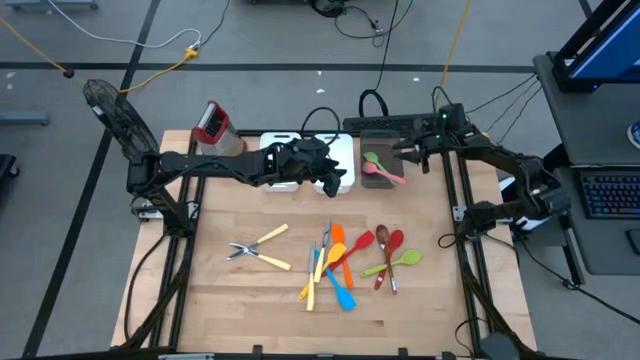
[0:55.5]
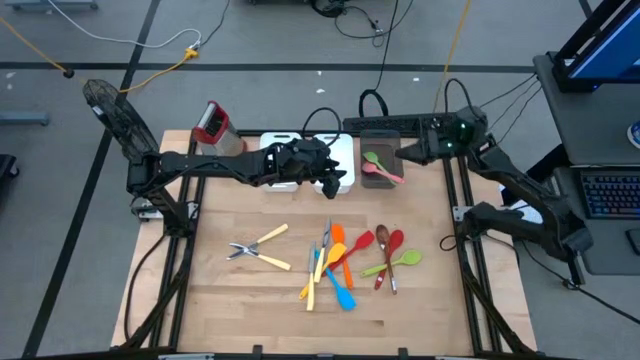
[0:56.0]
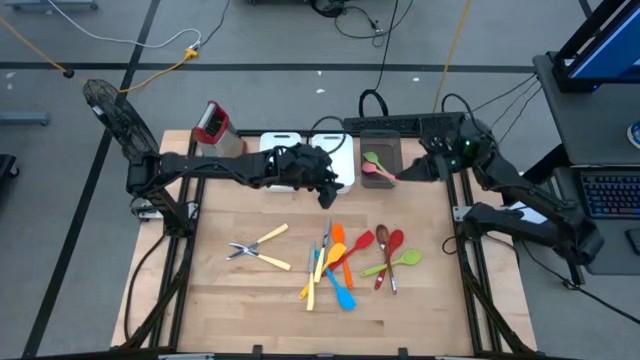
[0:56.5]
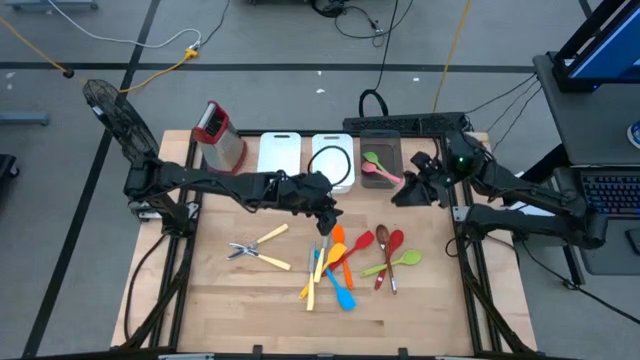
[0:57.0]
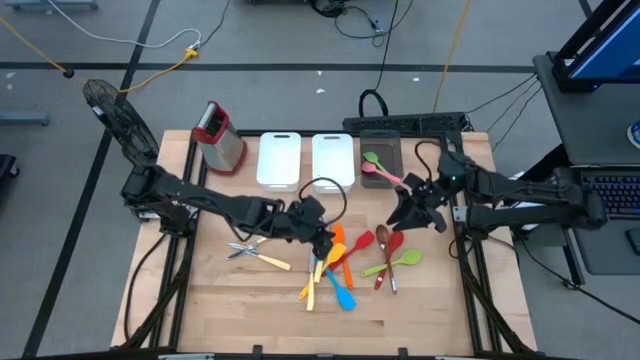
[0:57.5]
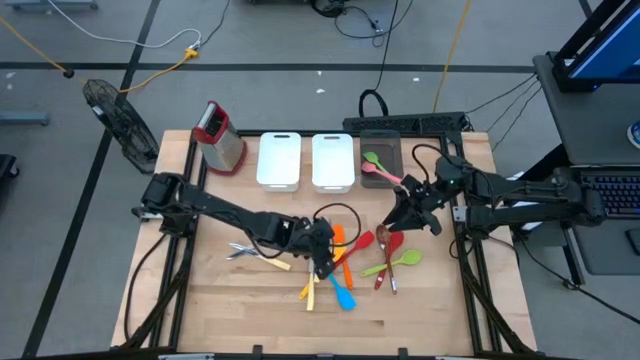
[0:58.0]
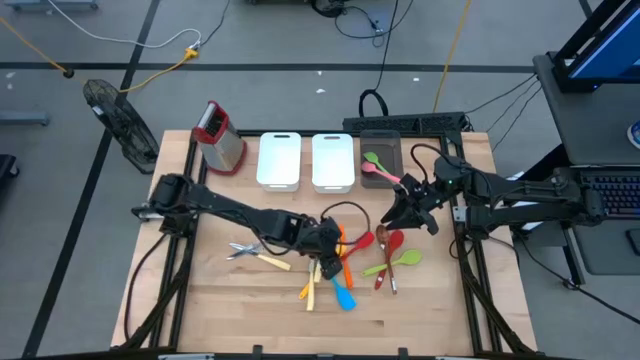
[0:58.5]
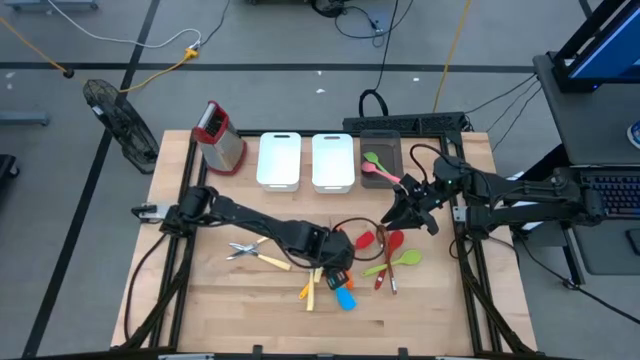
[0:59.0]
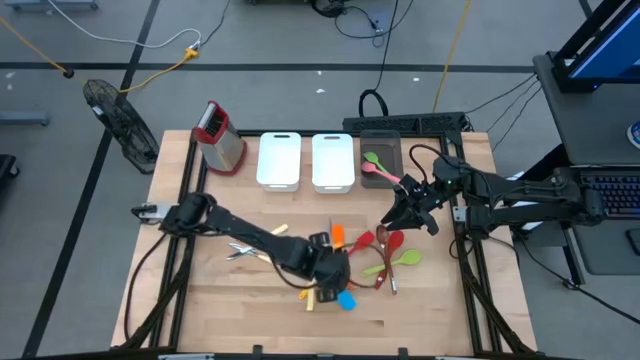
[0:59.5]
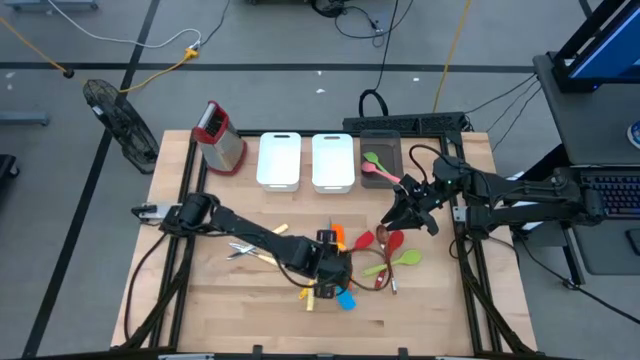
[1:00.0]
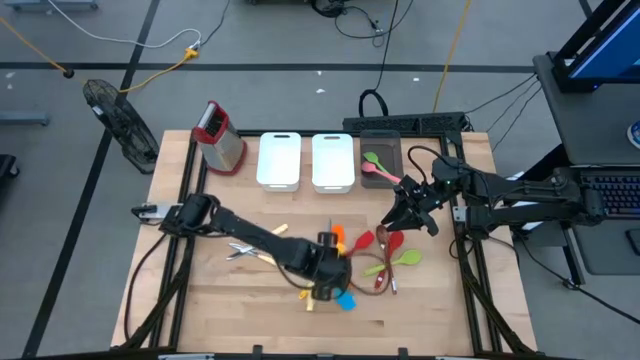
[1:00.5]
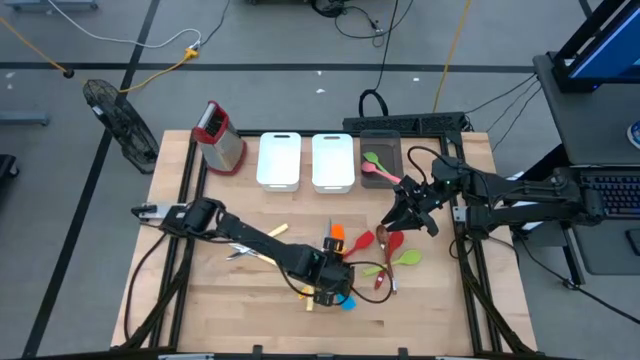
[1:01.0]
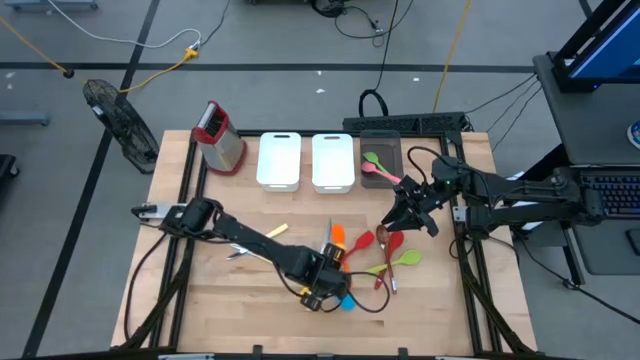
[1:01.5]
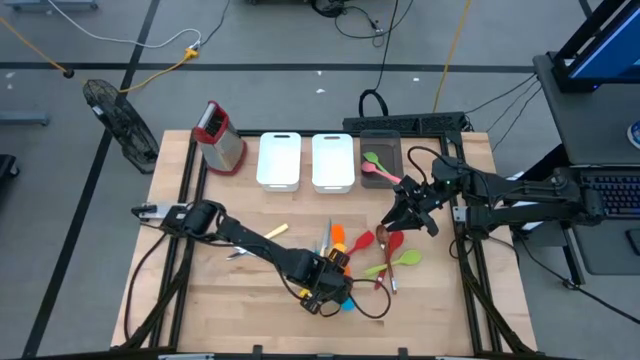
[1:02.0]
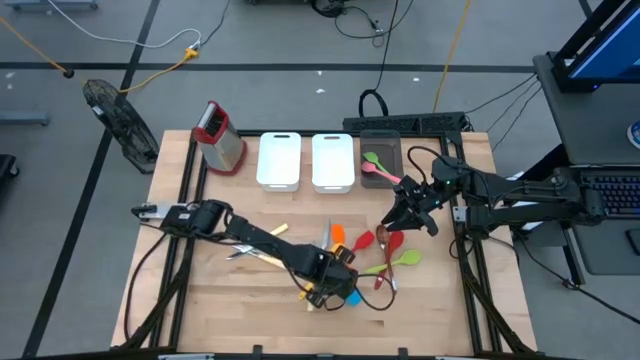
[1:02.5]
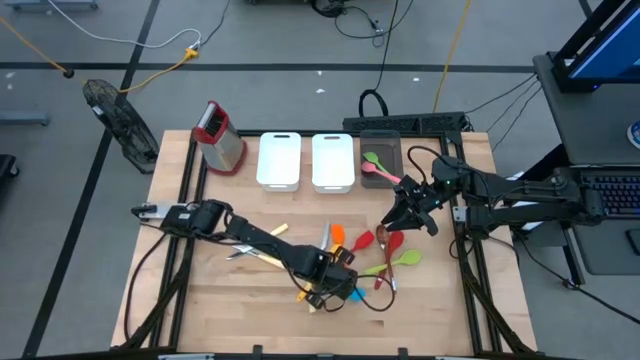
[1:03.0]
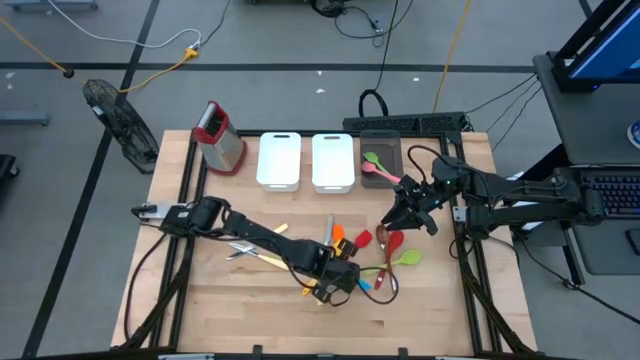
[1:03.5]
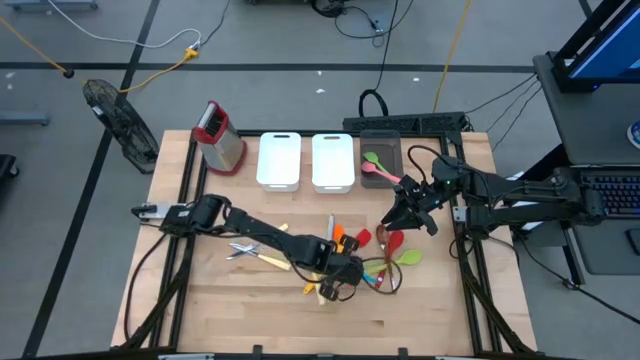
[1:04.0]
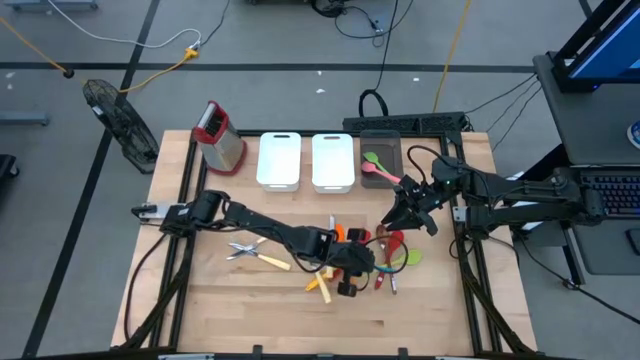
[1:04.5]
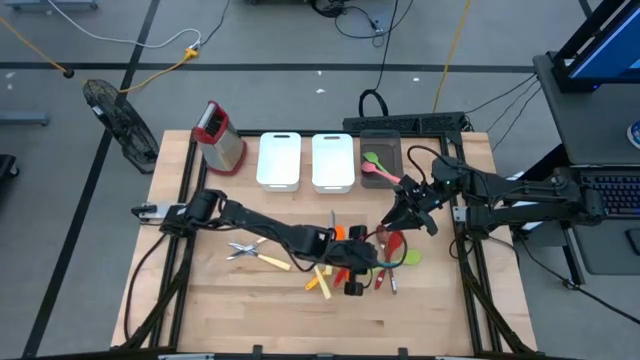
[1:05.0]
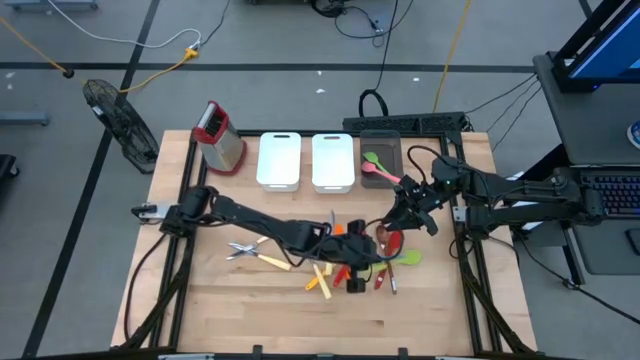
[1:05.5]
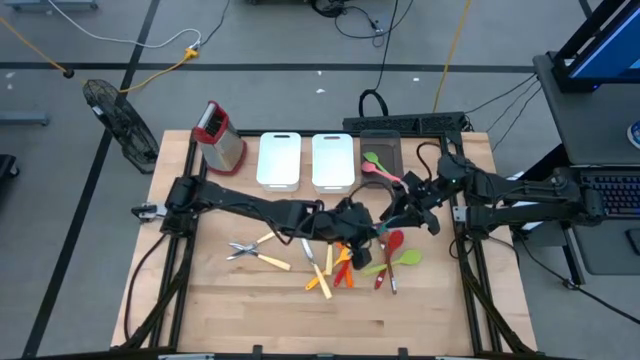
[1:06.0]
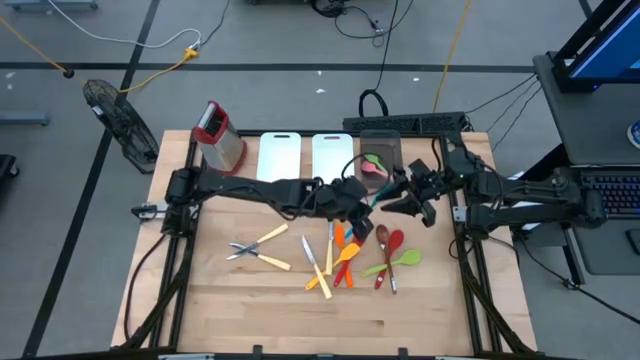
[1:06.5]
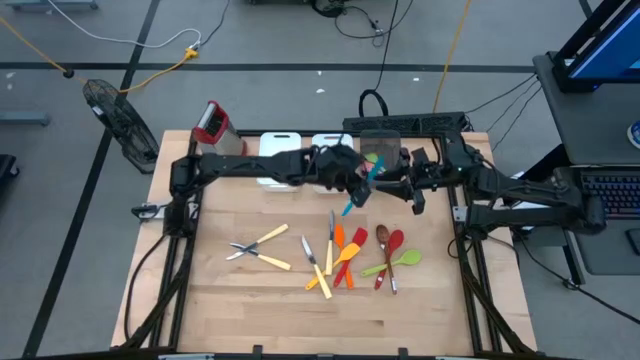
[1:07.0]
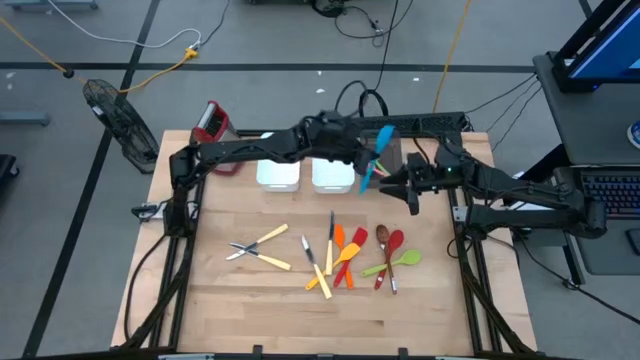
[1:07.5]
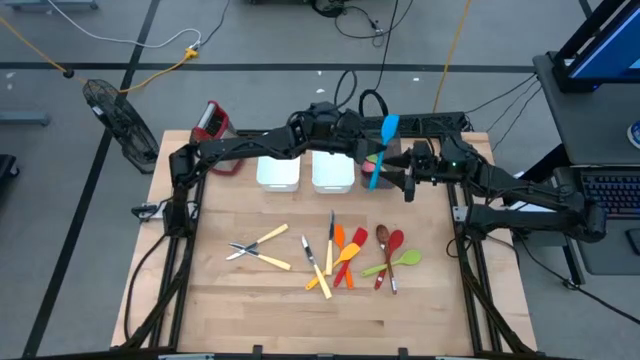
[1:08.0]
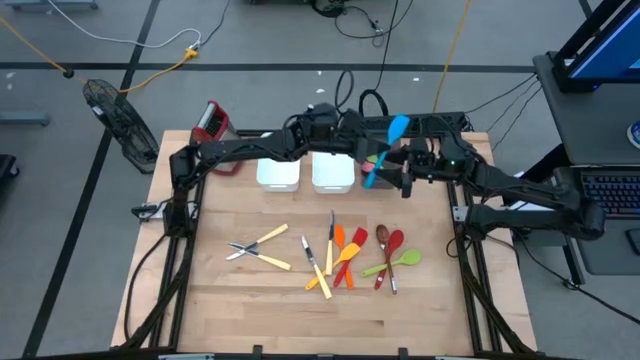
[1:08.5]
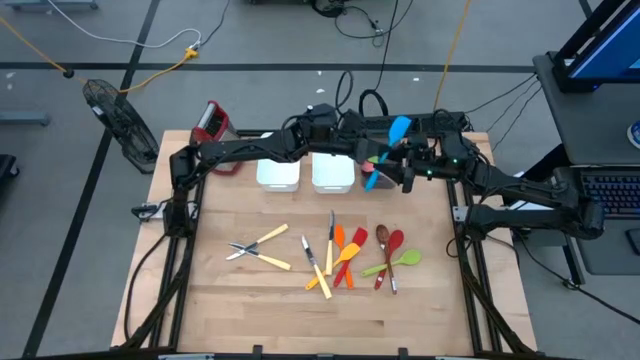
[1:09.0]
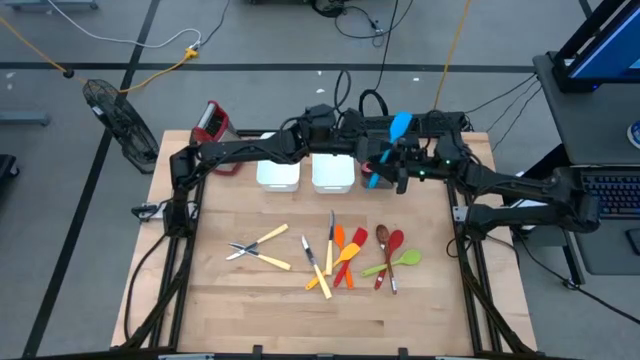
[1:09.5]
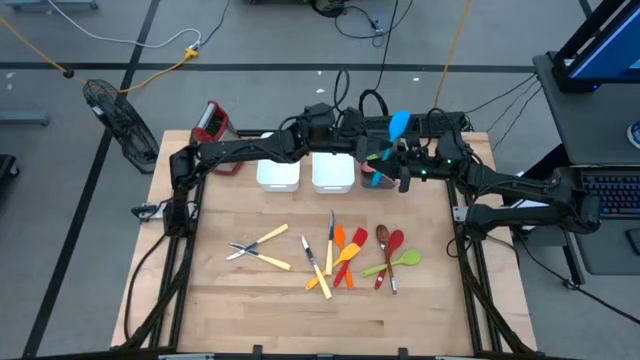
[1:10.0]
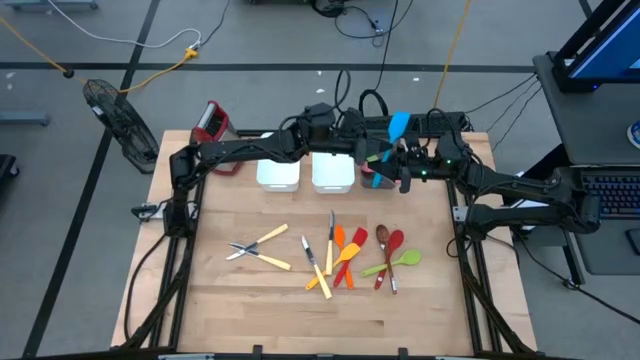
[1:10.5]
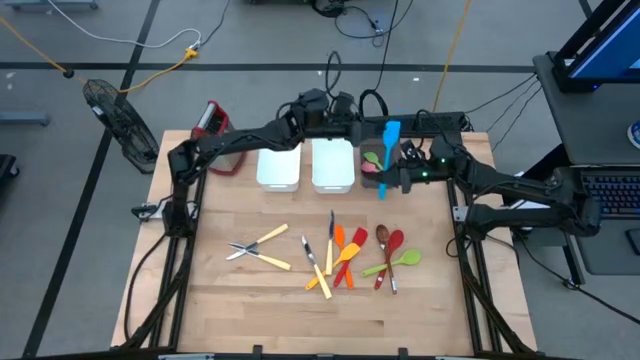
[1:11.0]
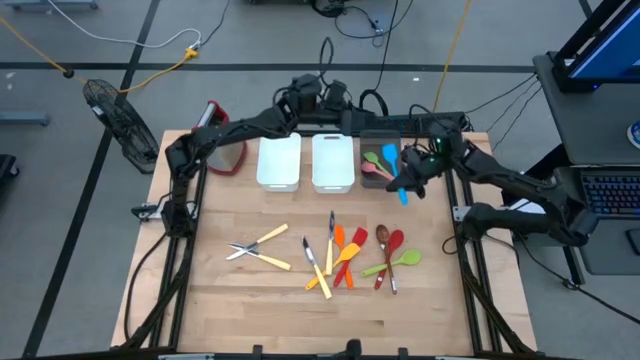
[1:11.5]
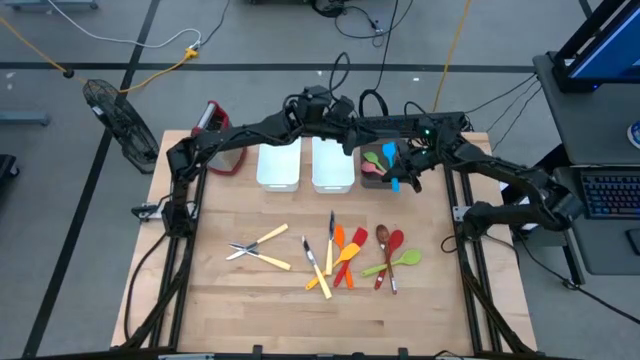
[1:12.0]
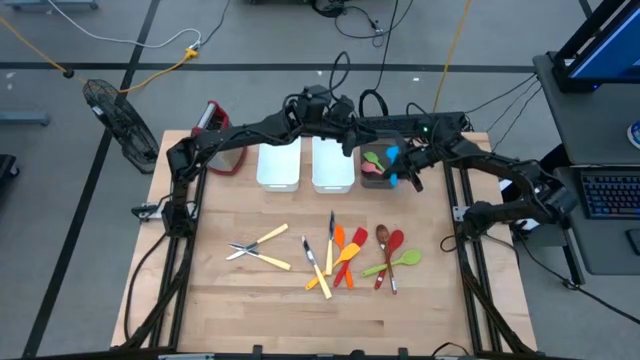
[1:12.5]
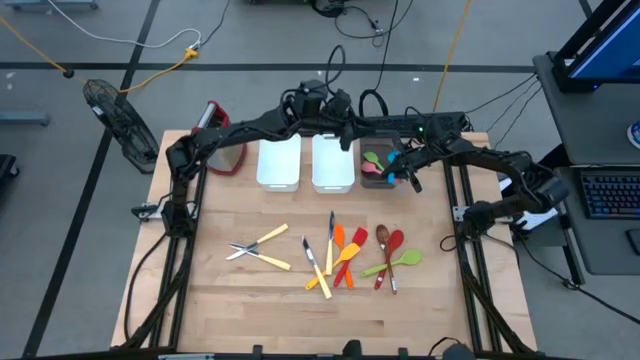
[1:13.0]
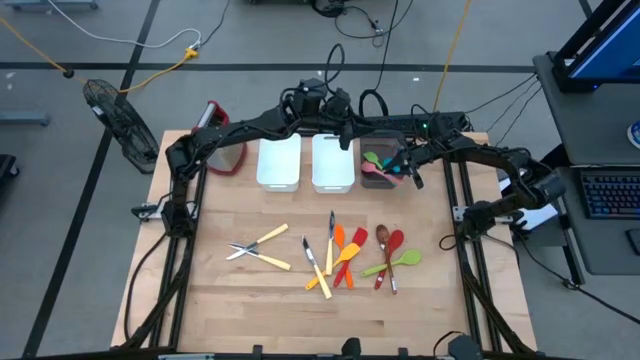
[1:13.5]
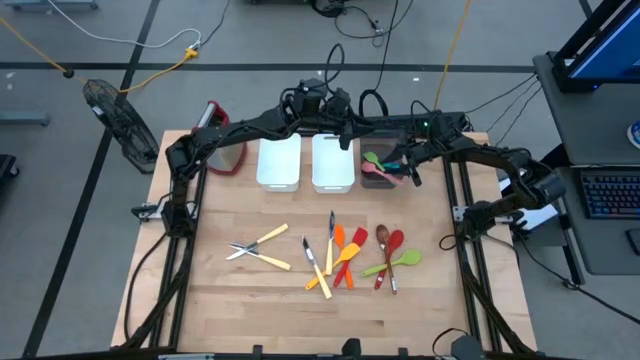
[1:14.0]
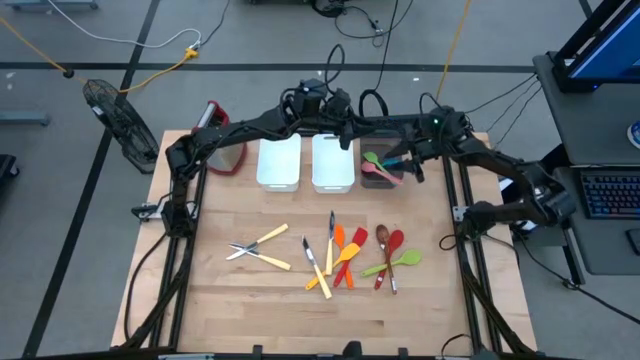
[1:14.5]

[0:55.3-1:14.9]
Task: Pick & Place Kitchen Items
Put the blue spatula into the black bin
